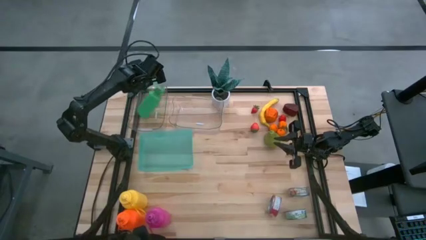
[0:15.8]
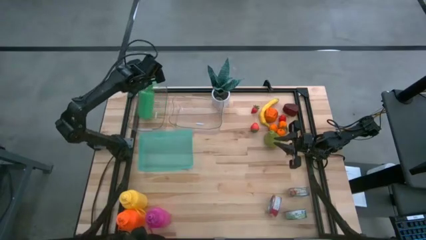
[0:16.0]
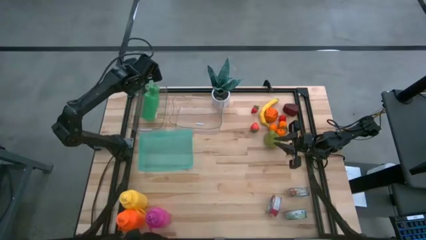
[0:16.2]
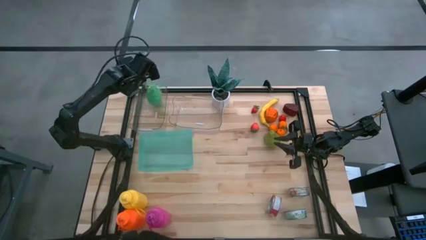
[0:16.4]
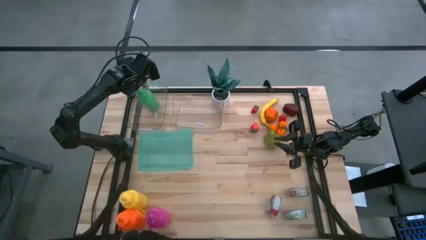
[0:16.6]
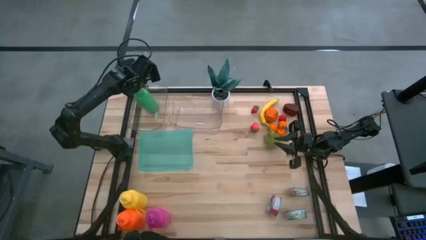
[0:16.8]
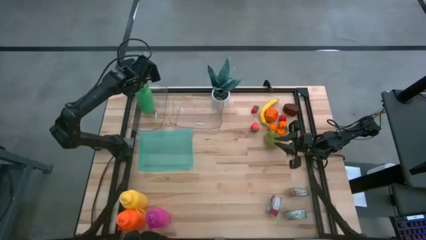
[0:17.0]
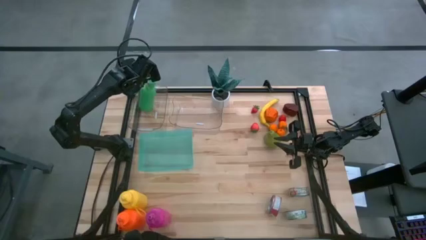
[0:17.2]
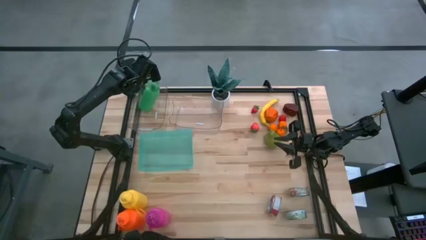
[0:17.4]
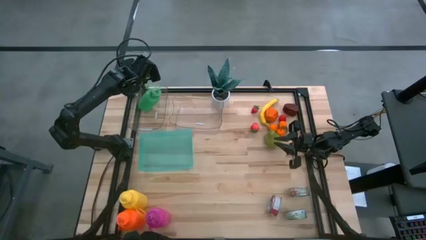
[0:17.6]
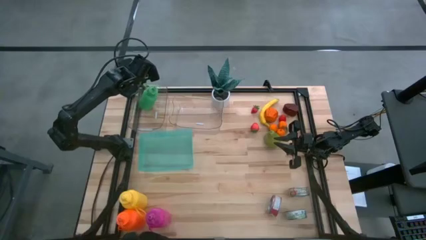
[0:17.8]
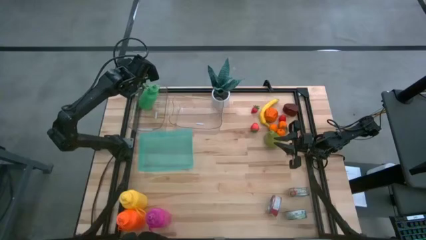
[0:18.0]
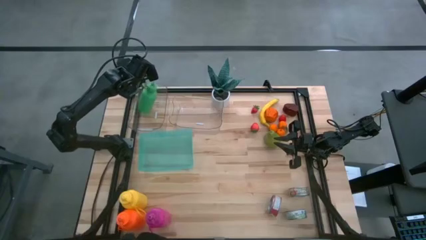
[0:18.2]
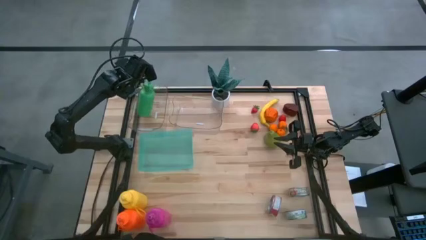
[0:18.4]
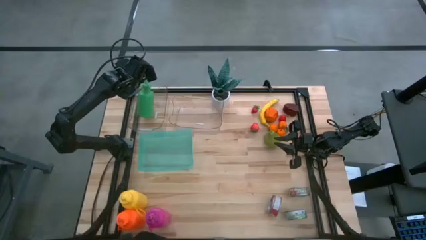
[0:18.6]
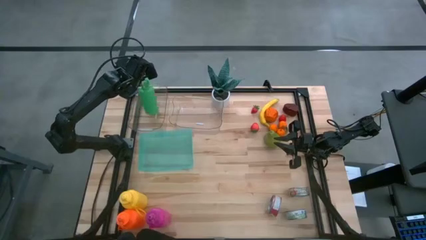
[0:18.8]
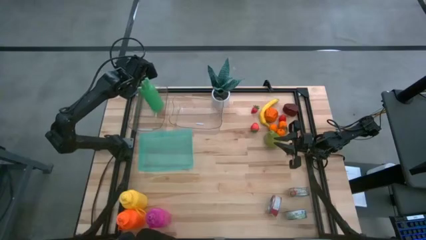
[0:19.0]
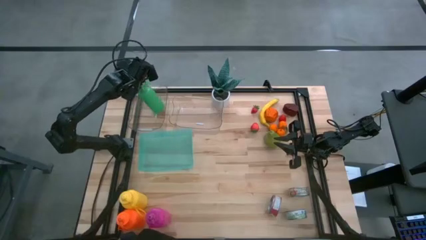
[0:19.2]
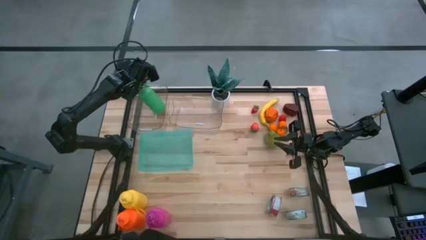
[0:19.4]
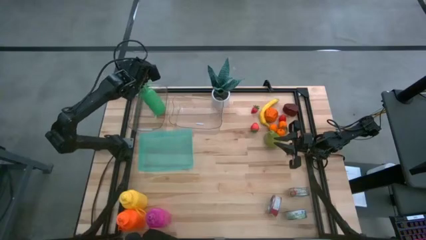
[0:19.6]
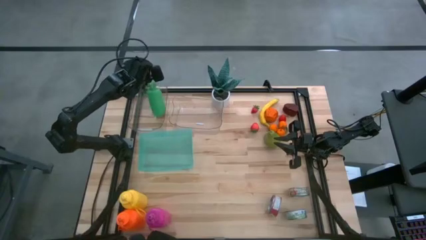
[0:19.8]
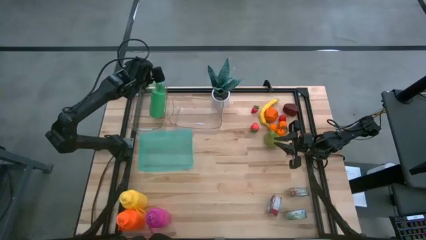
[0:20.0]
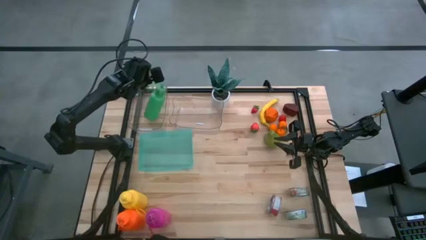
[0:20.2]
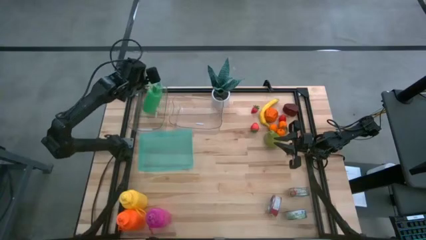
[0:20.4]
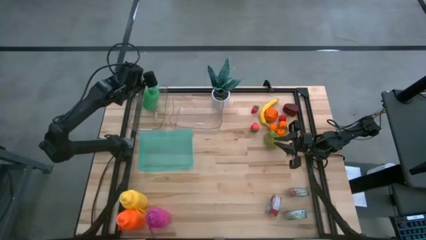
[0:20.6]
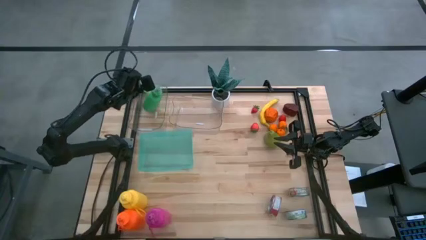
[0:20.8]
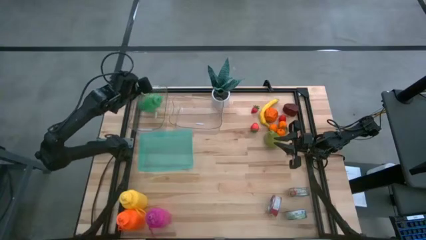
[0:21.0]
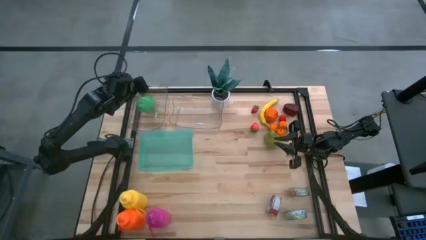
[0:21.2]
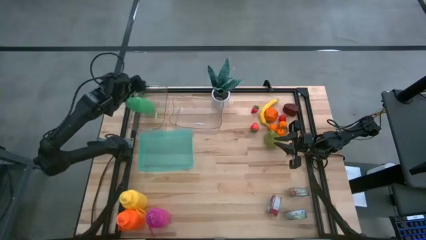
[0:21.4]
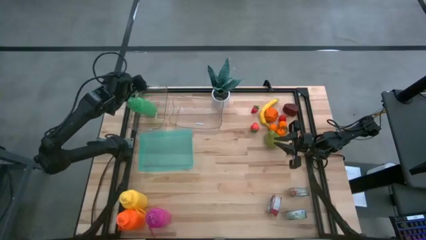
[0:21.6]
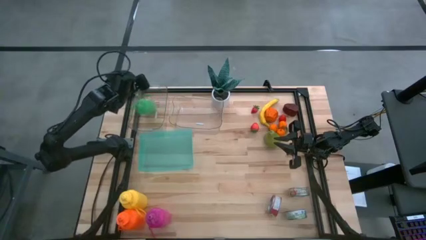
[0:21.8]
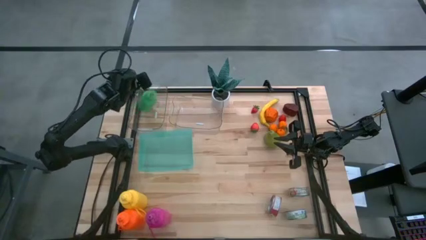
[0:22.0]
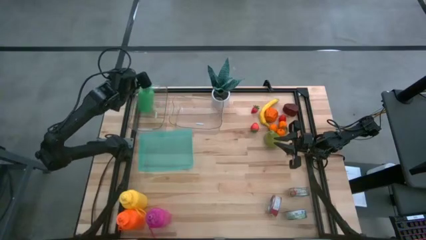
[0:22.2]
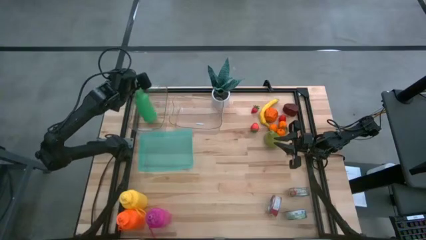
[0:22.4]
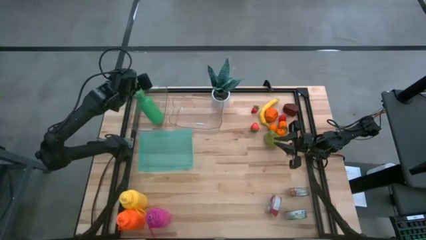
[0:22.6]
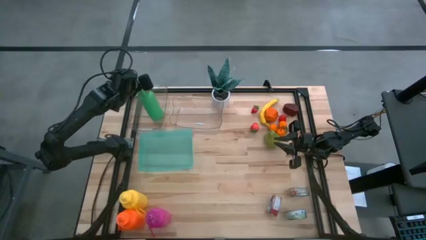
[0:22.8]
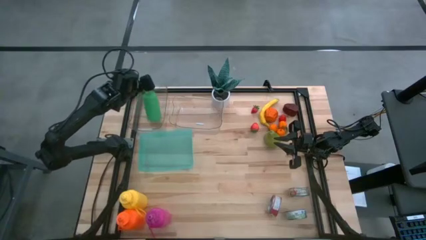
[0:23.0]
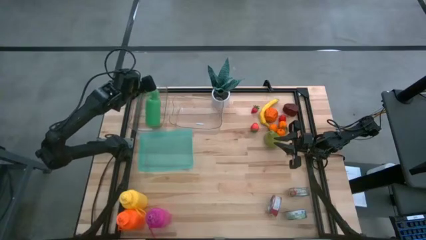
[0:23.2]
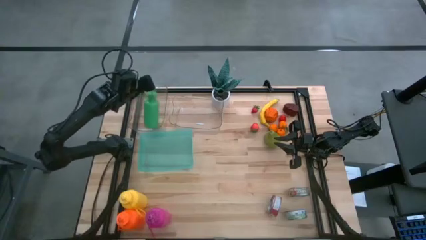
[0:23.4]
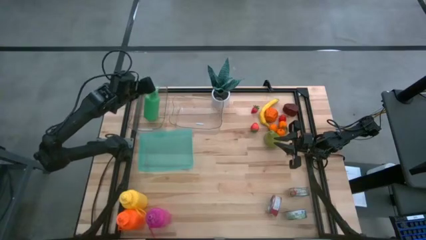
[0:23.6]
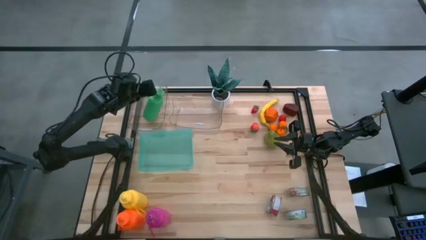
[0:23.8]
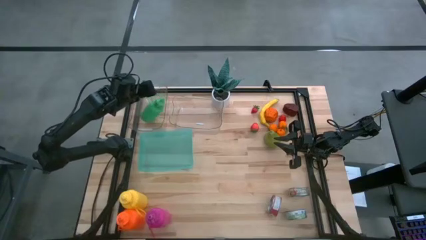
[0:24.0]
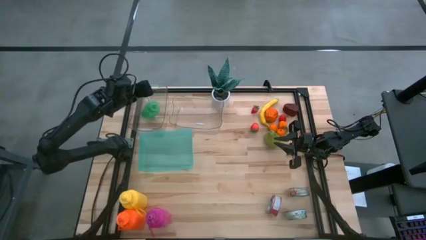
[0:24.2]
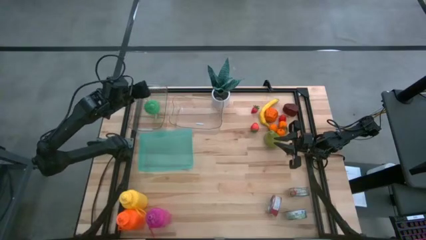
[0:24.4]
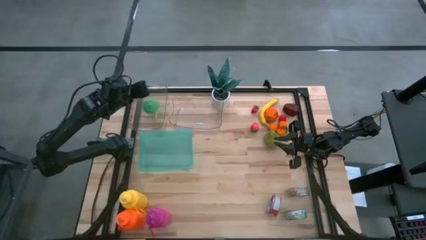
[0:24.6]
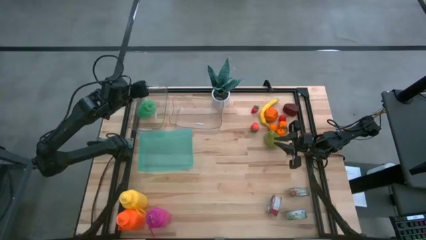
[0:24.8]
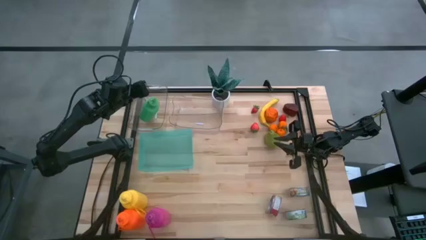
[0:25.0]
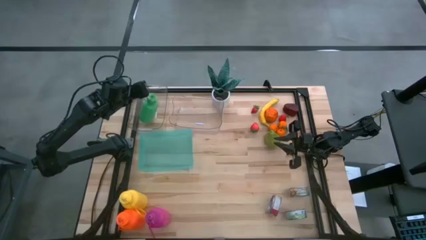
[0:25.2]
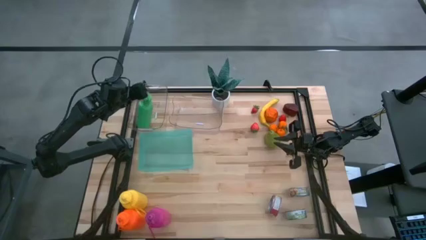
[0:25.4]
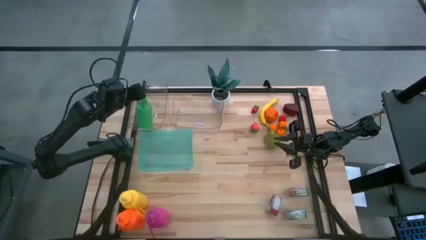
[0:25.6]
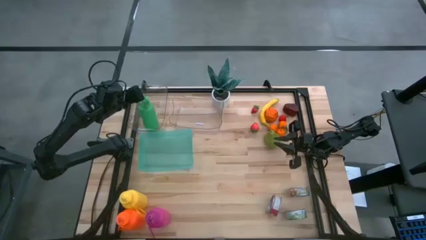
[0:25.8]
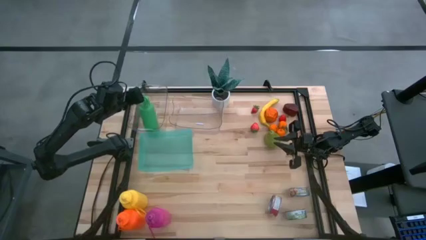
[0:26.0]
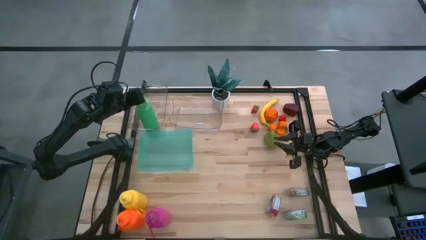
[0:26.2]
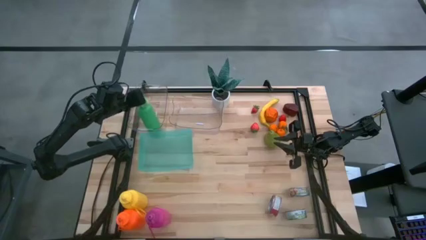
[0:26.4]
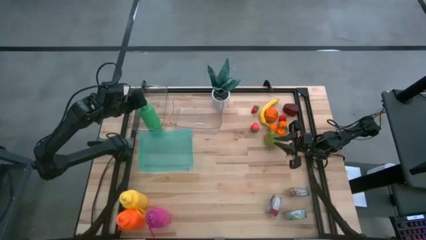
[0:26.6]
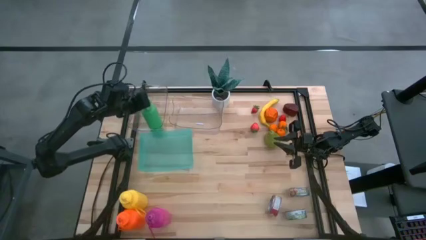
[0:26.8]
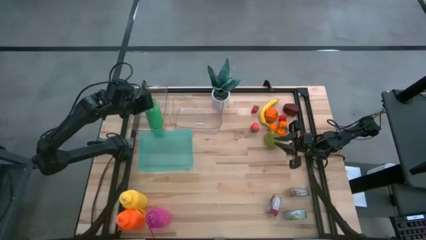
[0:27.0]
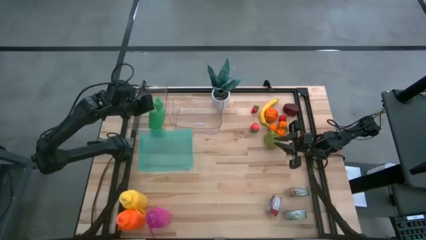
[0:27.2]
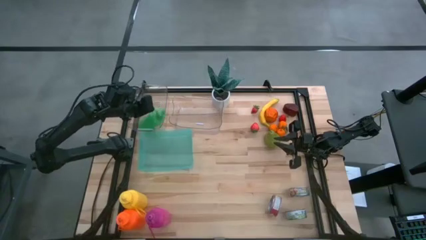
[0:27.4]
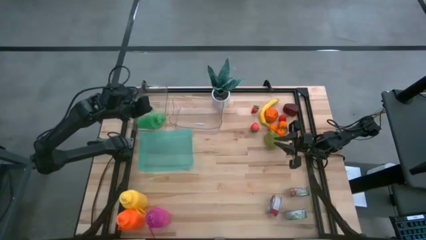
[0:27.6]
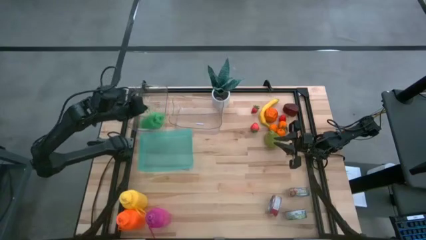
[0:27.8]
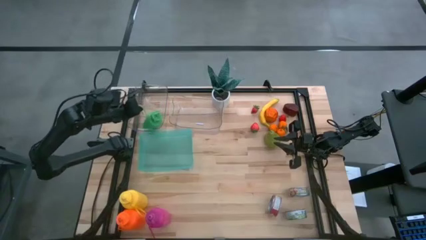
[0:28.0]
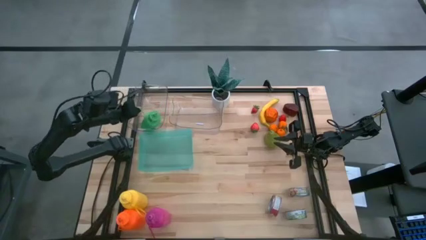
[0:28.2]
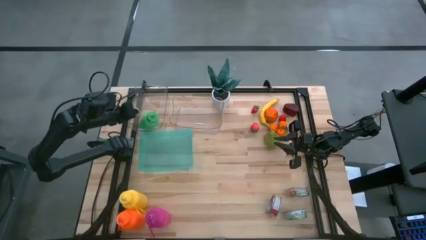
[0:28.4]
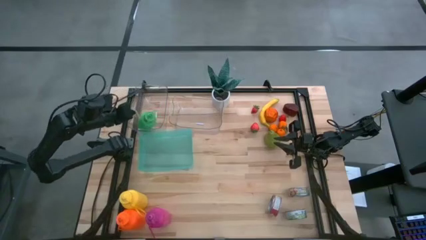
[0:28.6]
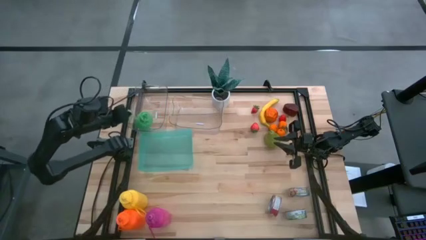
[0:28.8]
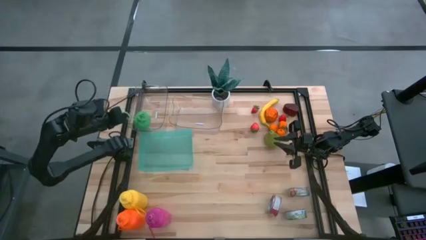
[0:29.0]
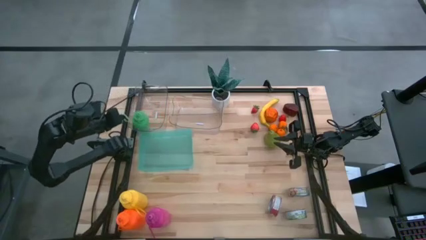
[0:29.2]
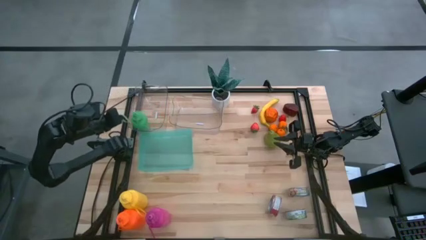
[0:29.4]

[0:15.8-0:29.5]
Task: Pick & Place Food Item
Put the green water bottle into the left transparent bin
